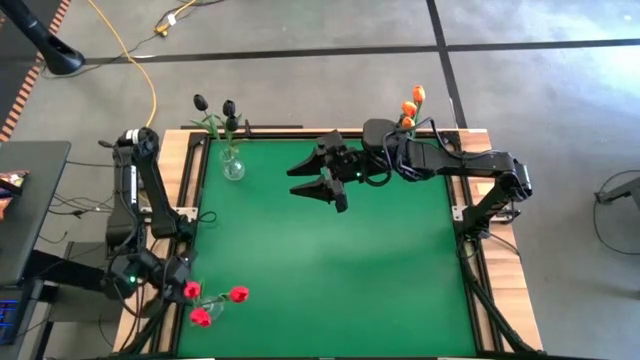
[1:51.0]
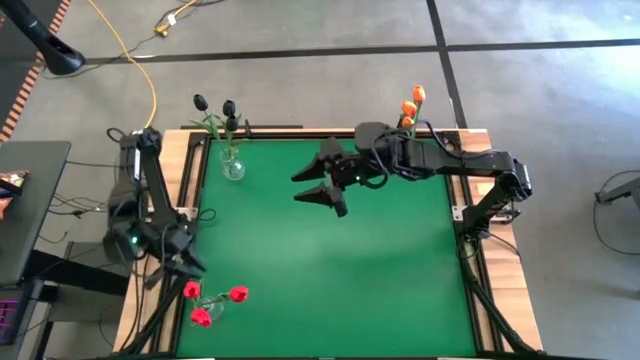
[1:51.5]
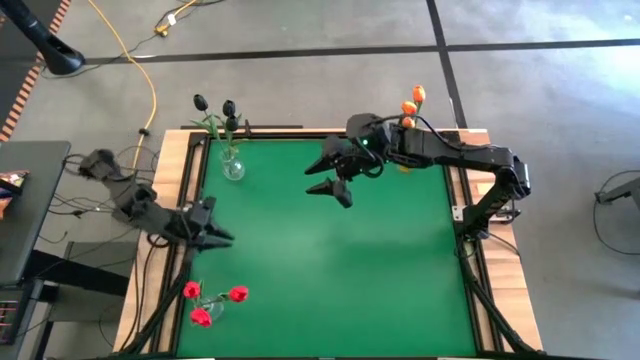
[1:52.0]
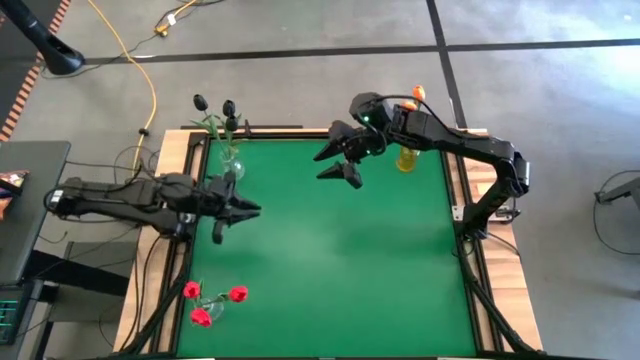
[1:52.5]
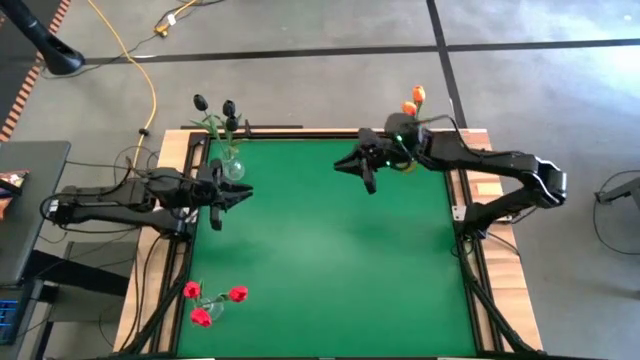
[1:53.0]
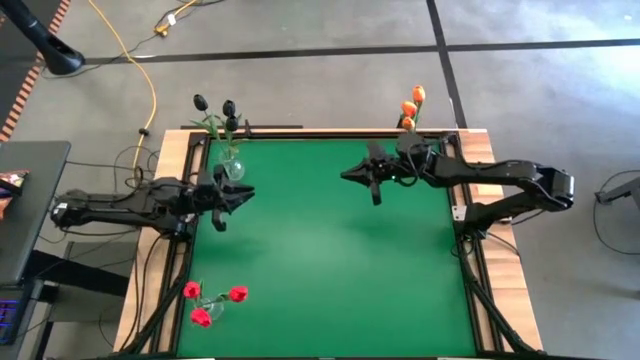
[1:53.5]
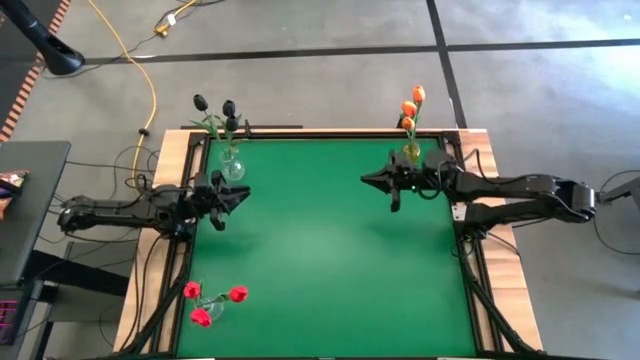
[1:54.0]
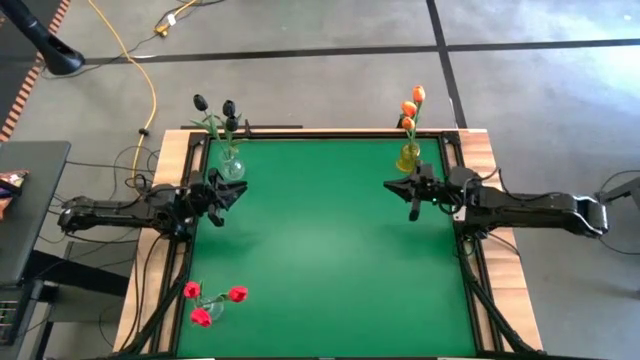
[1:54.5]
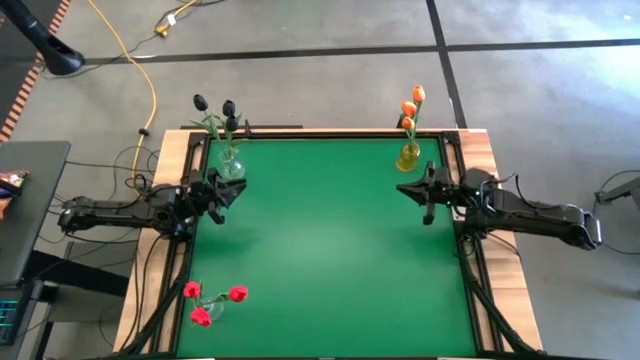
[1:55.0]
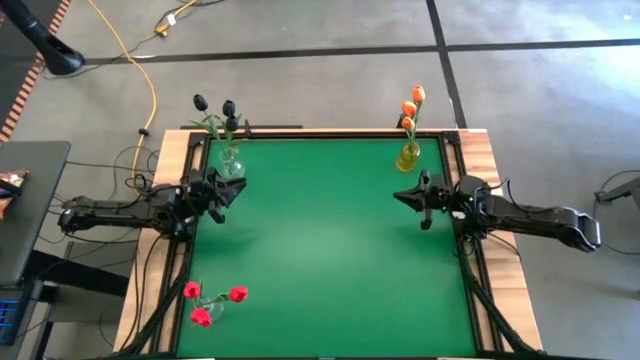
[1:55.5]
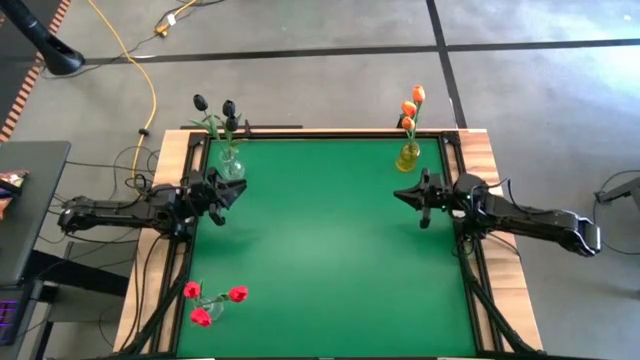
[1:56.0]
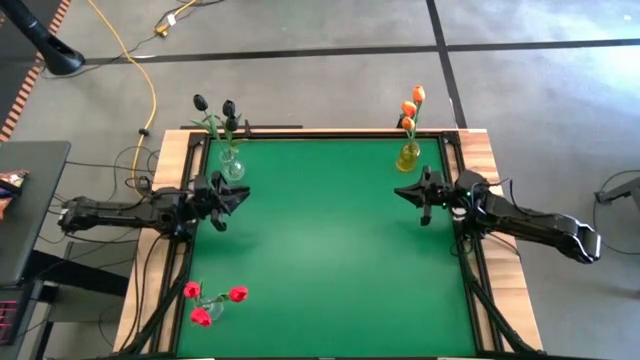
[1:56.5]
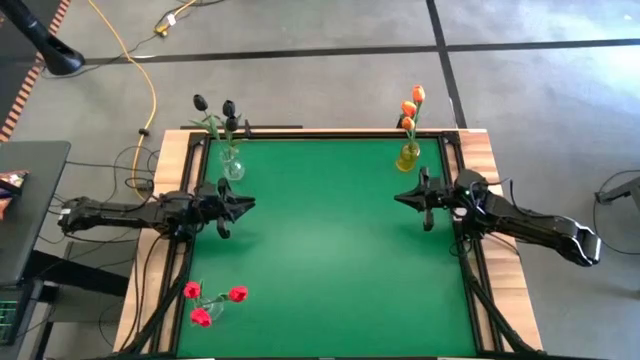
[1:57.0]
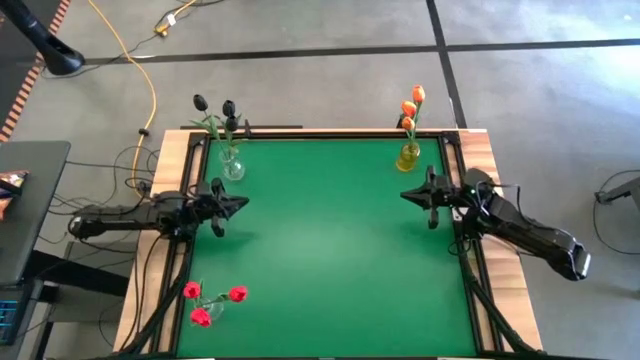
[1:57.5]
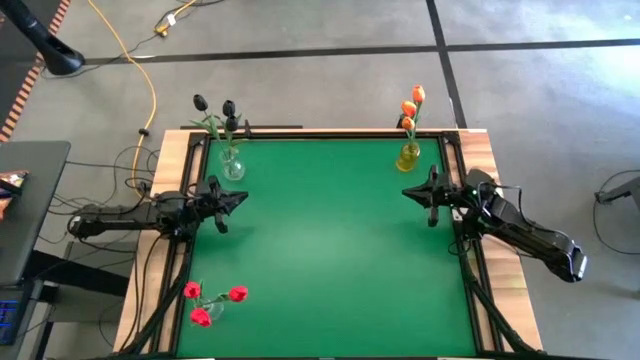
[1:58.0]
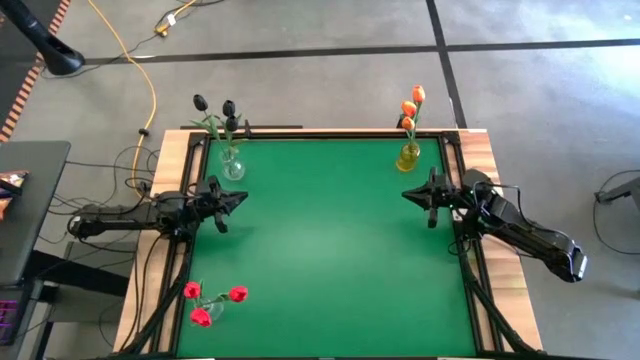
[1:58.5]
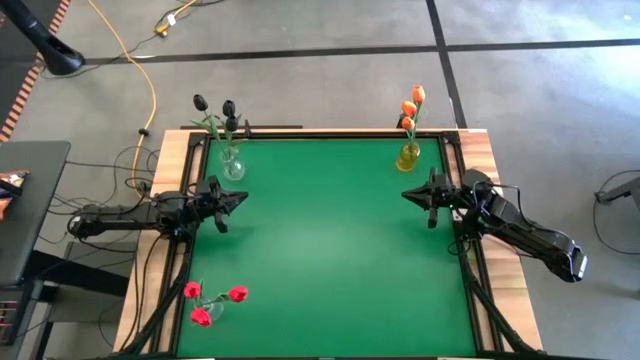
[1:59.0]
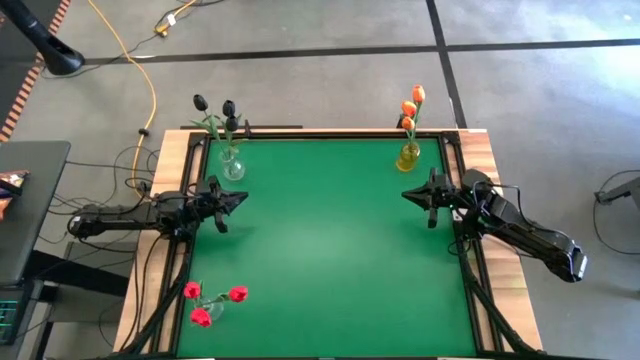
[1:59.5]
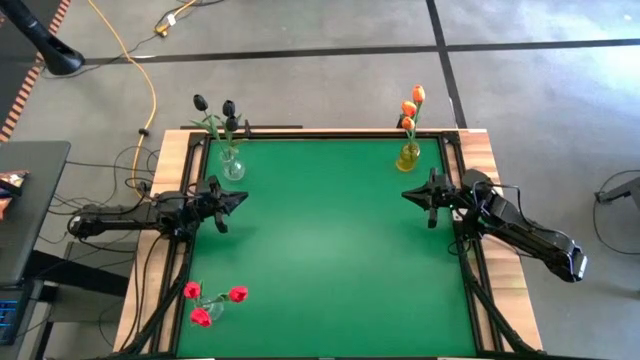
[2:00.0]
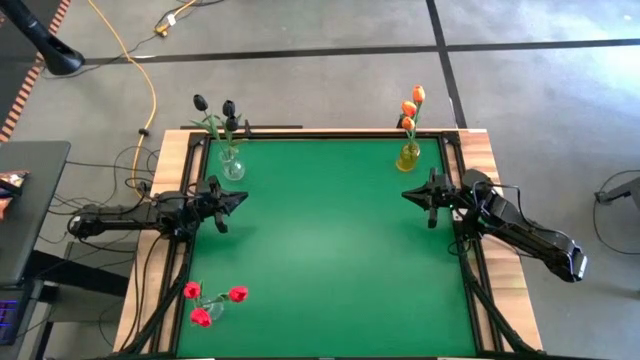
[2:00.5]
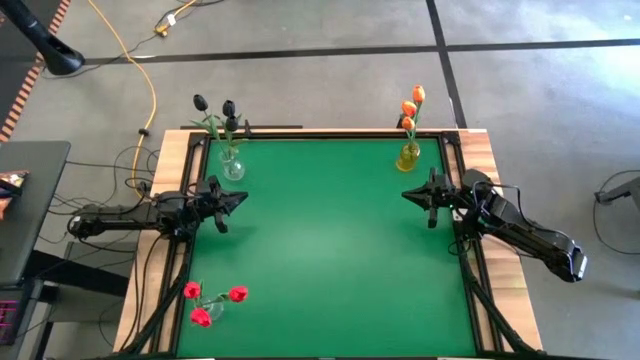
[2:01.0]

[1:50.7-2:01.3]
Task: Sort flowers into vase by color
Return to Home Position

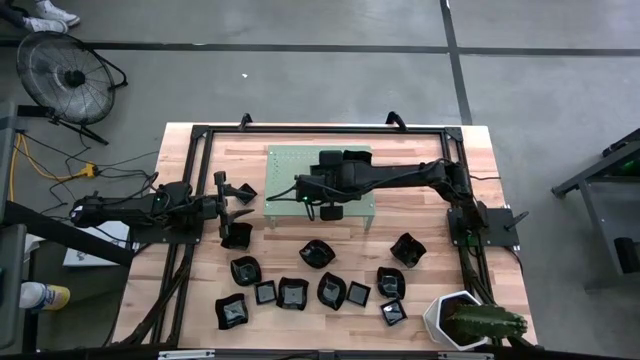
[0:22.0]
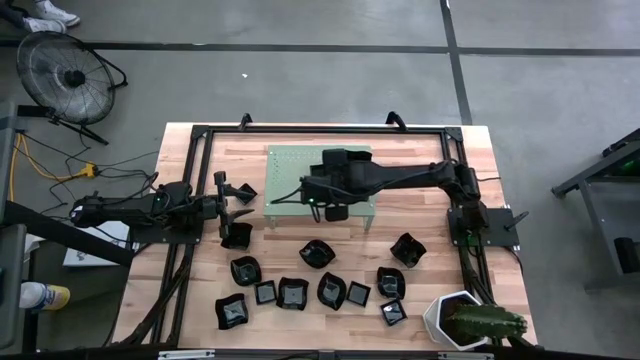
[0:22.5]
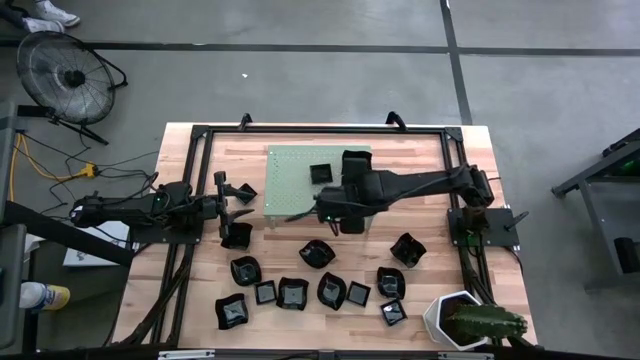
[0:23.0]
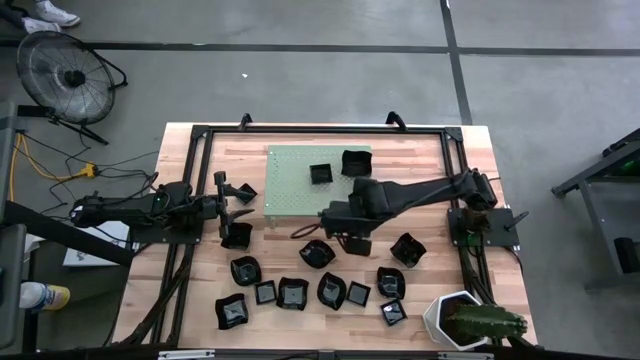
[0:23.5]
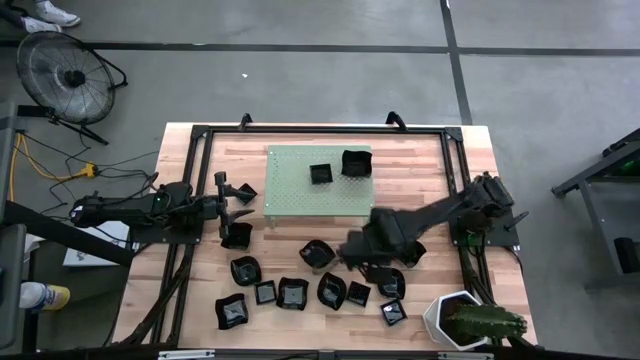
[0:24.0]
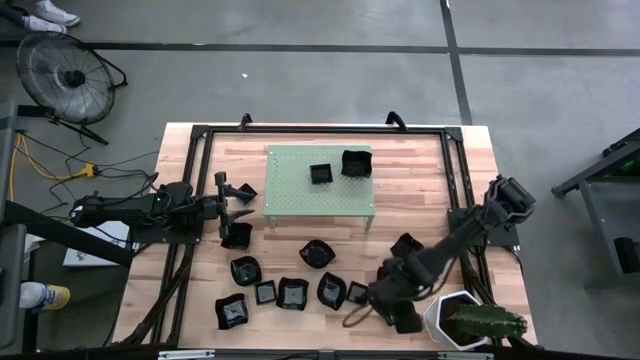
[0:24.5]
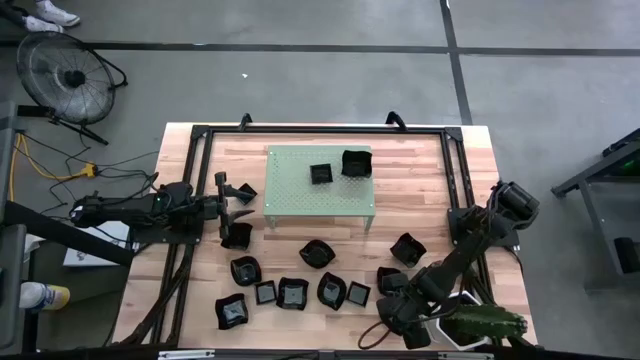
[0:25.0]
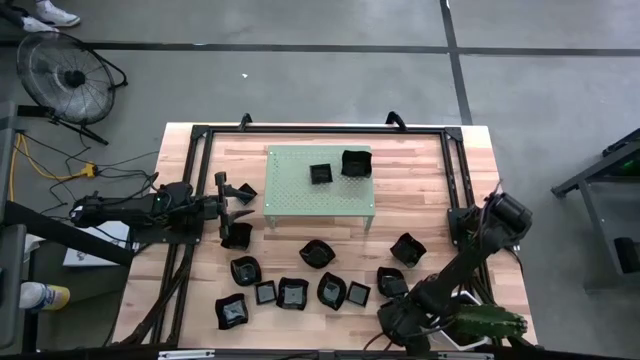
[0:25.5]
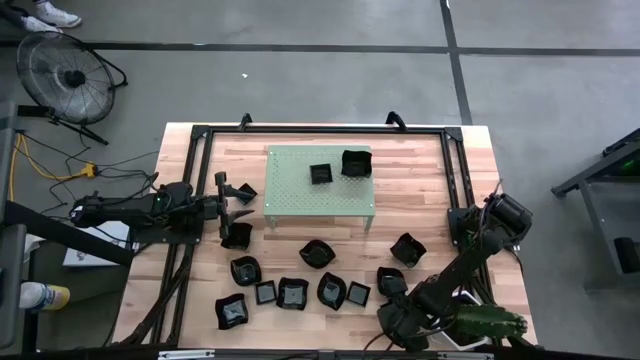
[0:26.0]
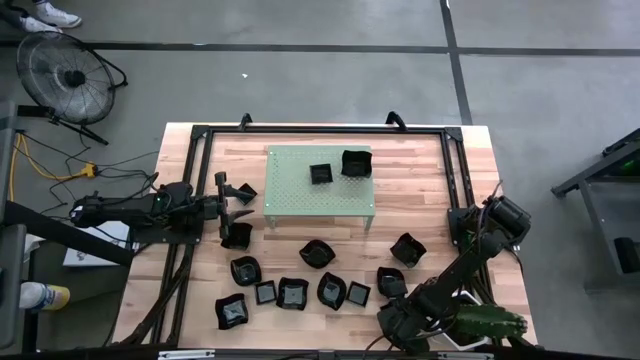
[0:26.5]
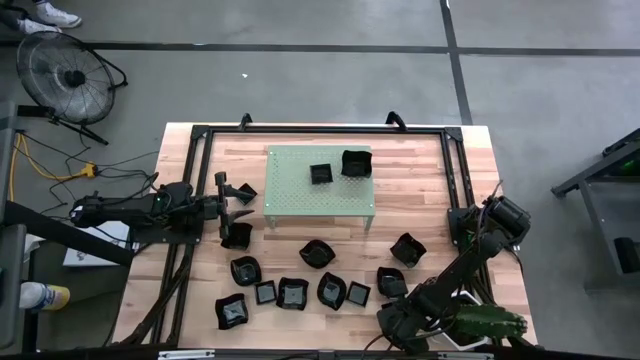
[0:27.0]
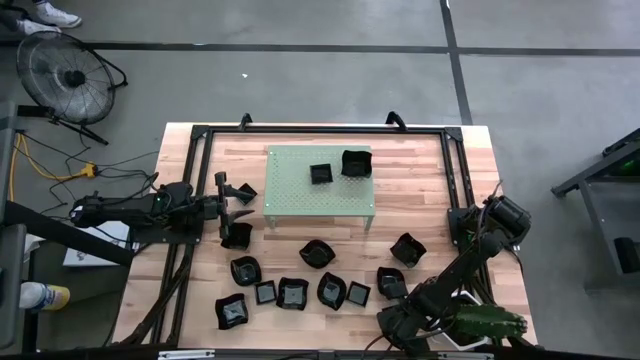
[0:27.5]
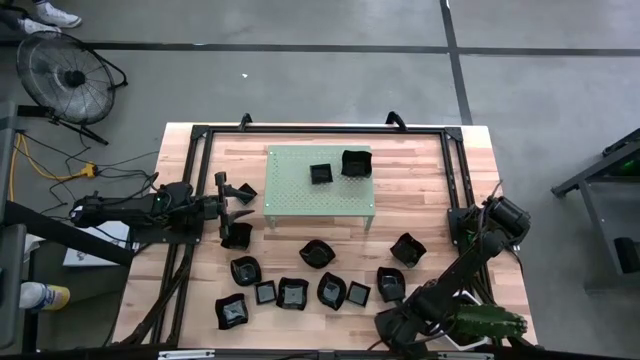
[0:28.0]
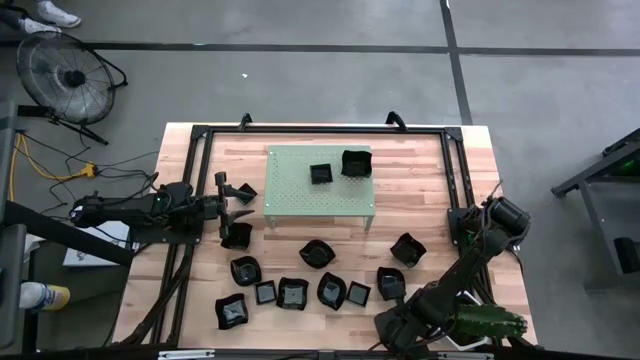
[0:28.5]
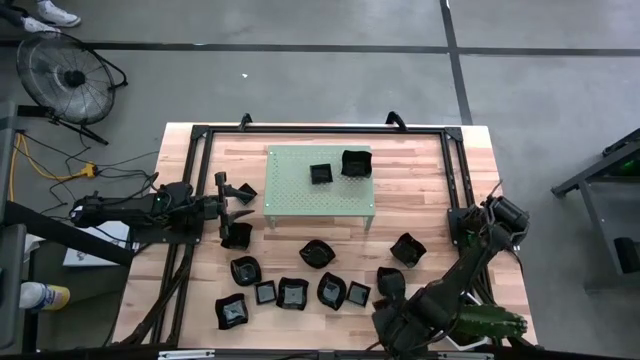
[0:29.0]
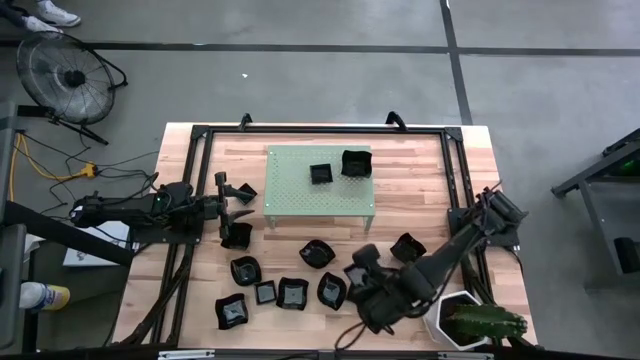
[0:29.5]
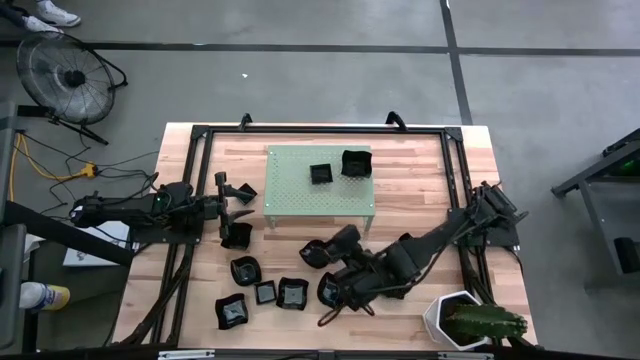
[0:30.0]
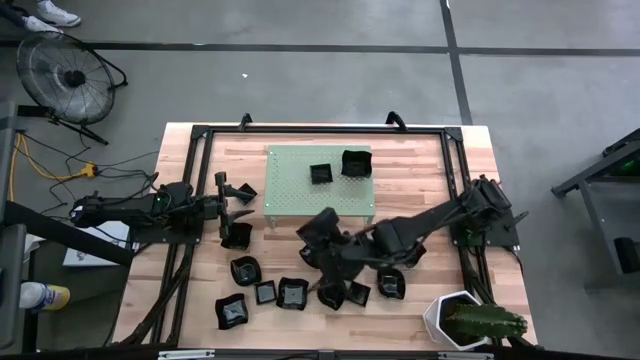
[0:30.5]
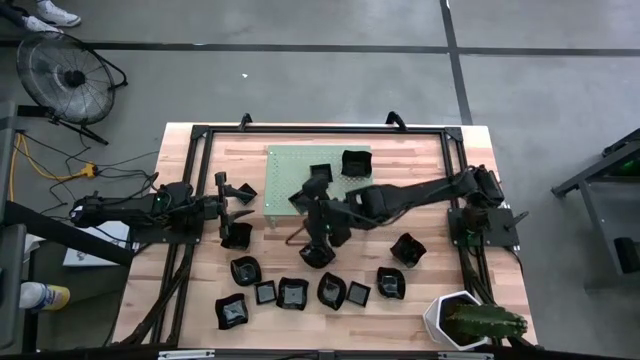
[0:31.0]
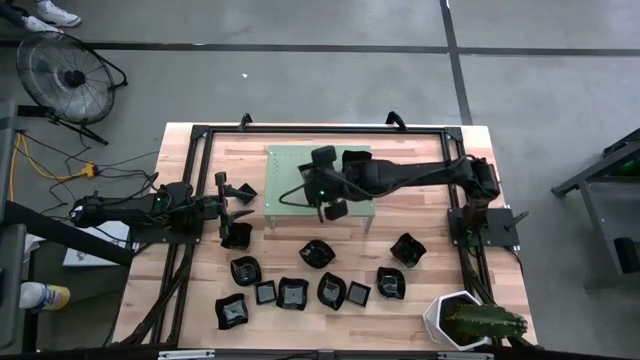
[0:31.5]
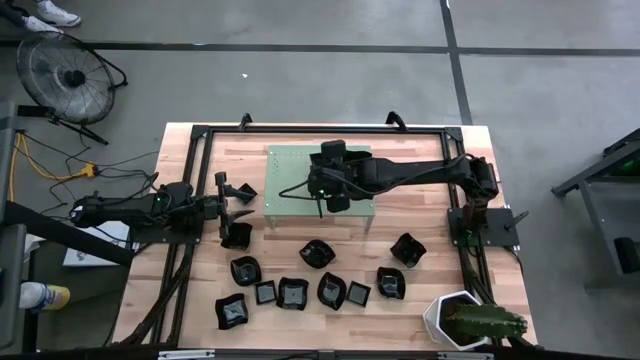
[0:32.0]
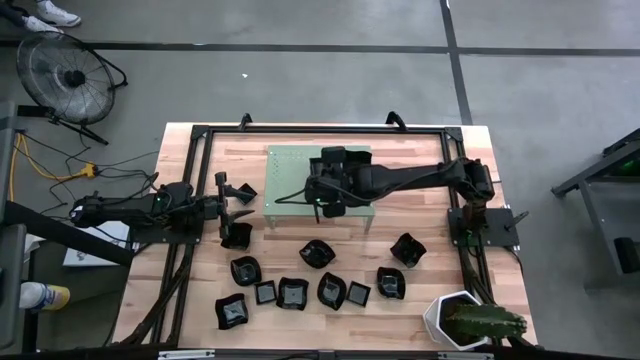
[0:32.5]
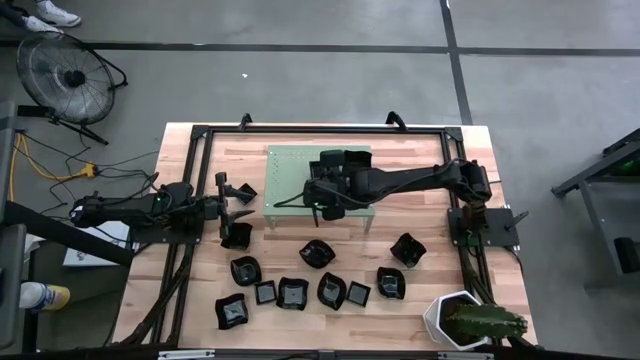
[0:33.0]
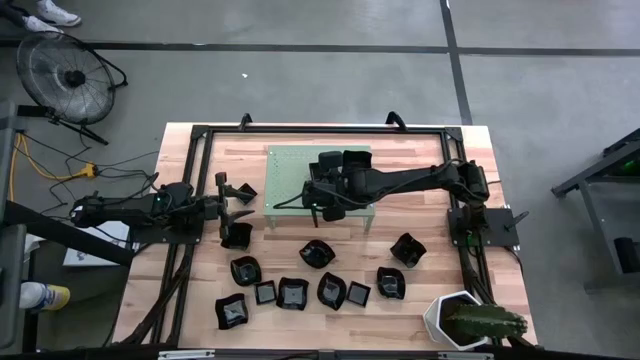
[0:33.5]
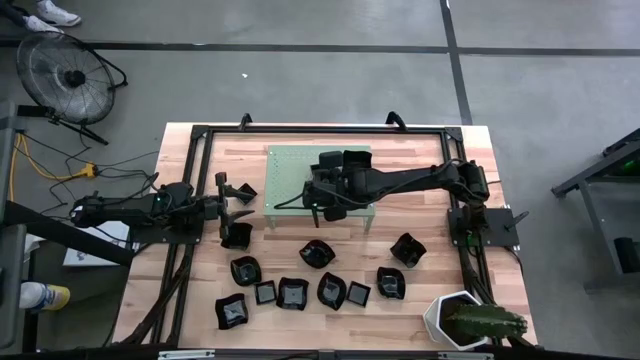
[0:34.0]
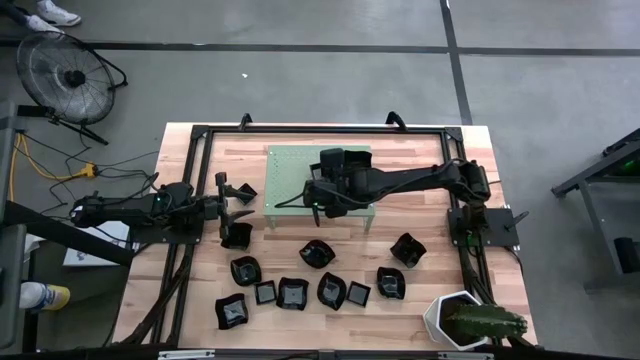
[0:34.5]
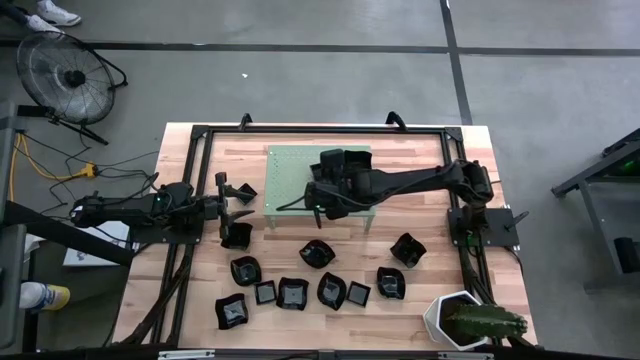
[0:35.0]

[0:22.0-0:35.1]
Task: Pick & Place Mini shaped plates
Stack the square plate on top of the other square plate on the shelf
